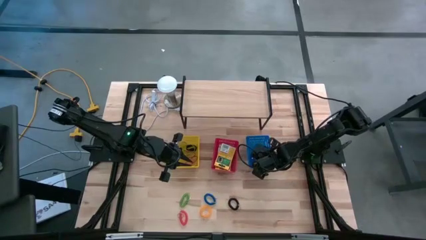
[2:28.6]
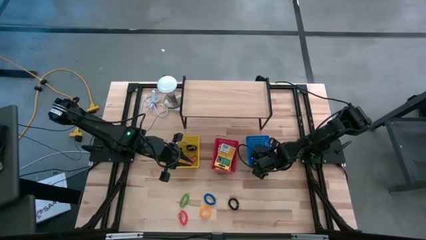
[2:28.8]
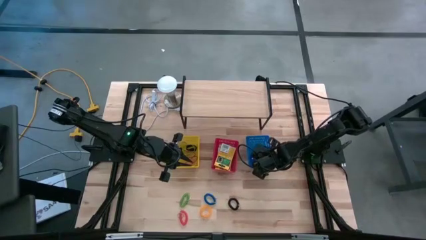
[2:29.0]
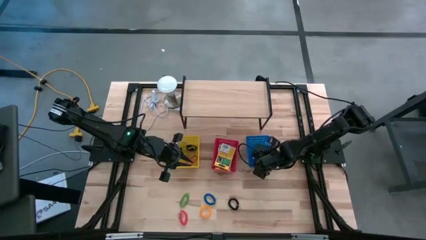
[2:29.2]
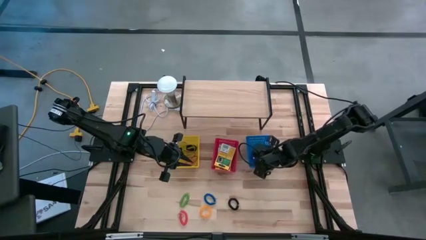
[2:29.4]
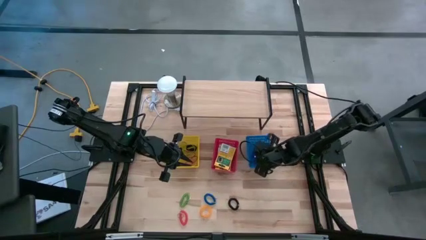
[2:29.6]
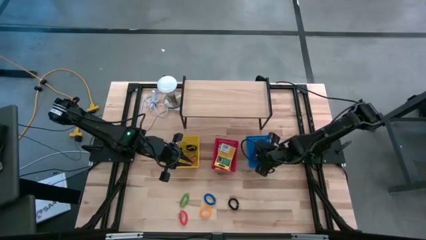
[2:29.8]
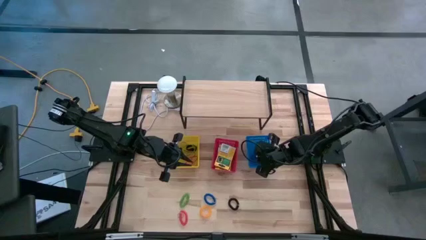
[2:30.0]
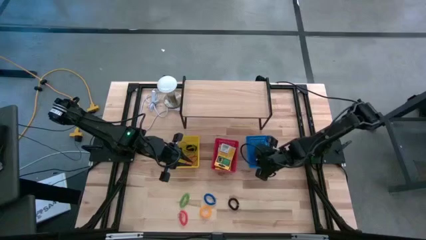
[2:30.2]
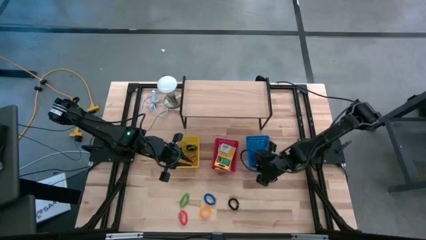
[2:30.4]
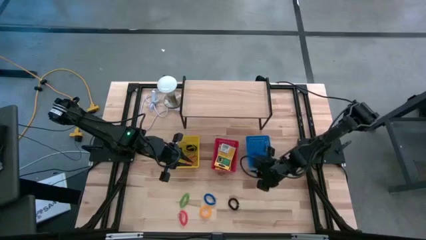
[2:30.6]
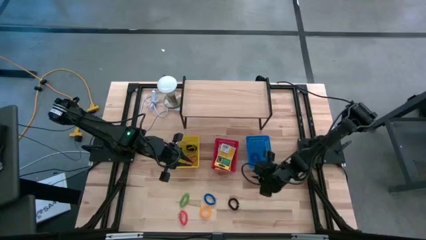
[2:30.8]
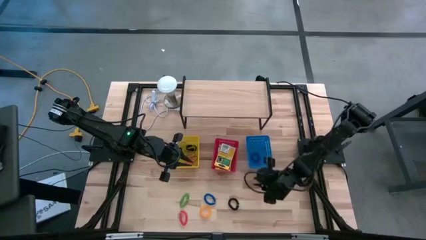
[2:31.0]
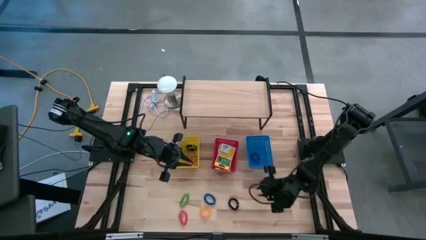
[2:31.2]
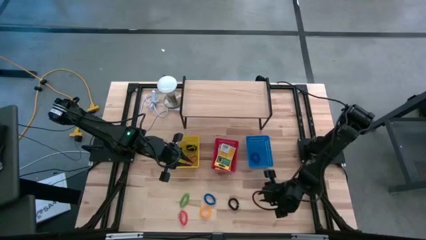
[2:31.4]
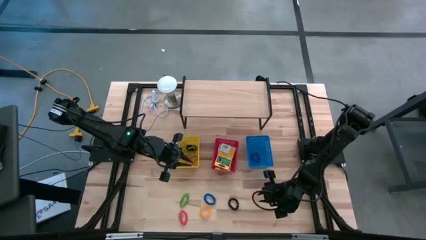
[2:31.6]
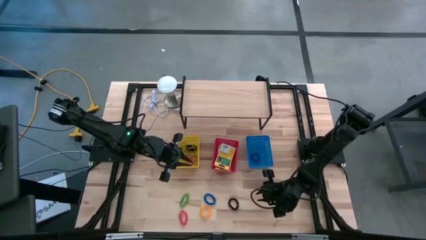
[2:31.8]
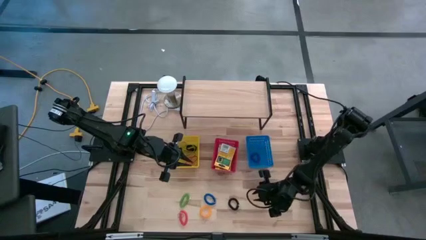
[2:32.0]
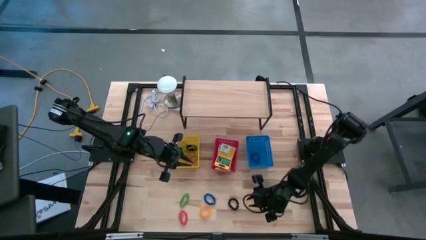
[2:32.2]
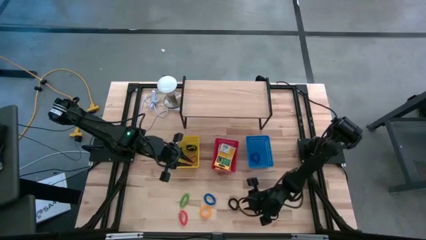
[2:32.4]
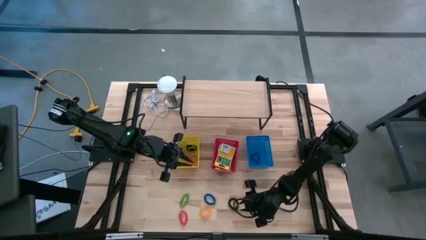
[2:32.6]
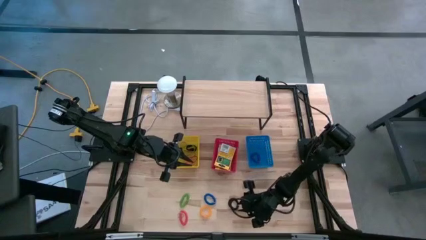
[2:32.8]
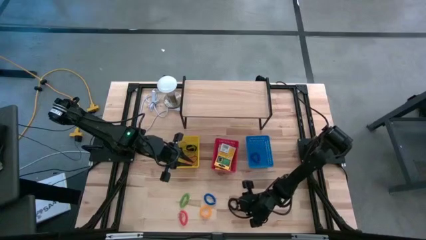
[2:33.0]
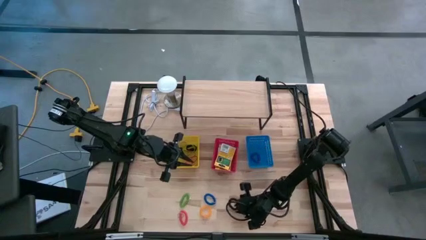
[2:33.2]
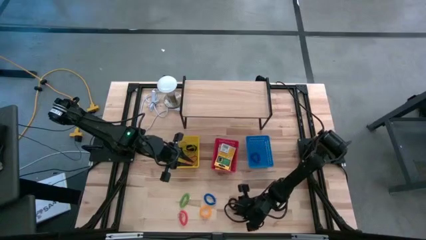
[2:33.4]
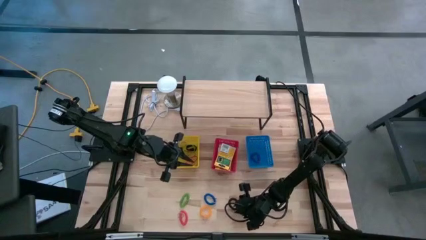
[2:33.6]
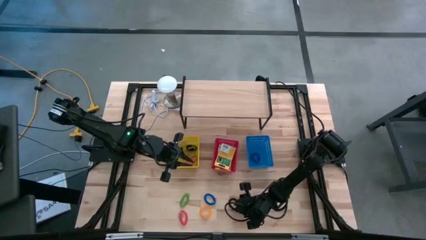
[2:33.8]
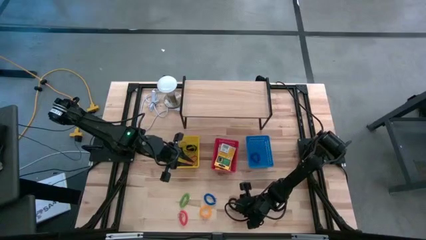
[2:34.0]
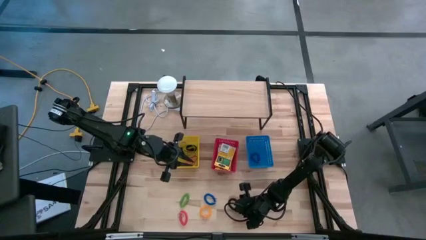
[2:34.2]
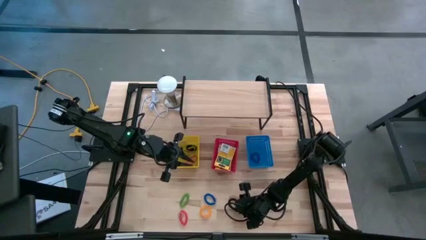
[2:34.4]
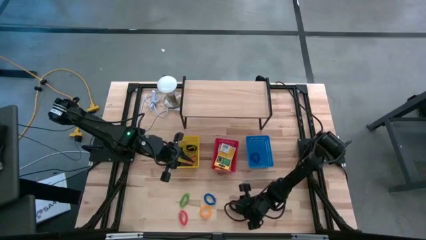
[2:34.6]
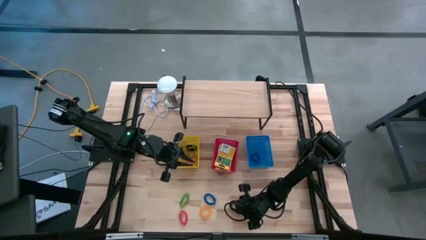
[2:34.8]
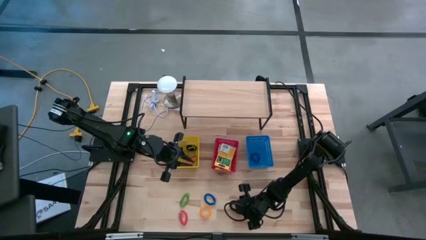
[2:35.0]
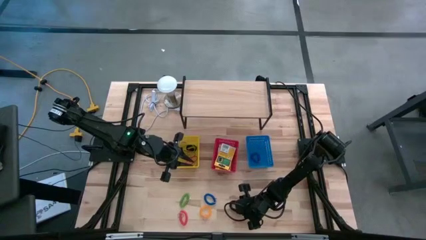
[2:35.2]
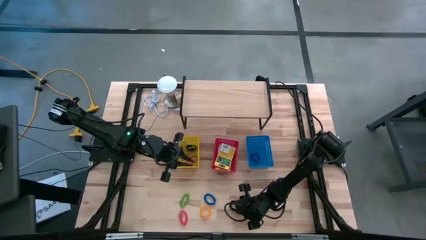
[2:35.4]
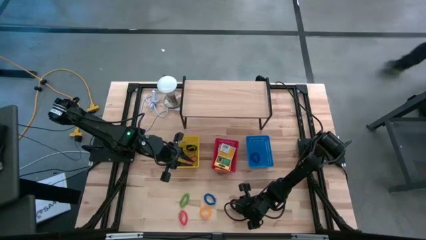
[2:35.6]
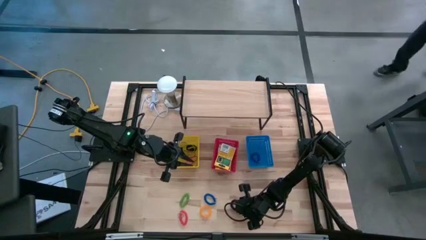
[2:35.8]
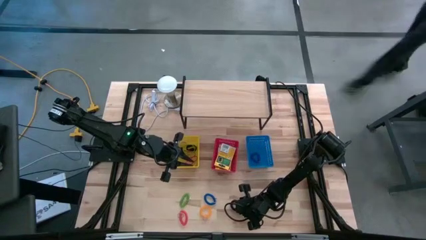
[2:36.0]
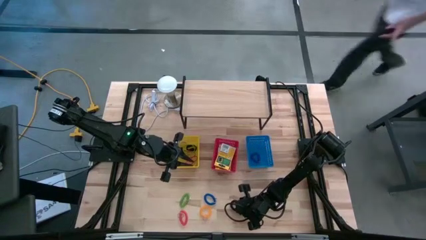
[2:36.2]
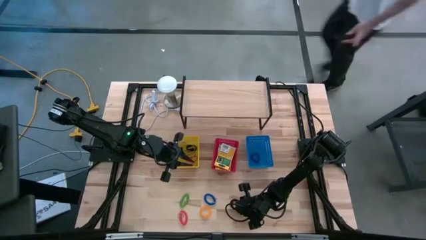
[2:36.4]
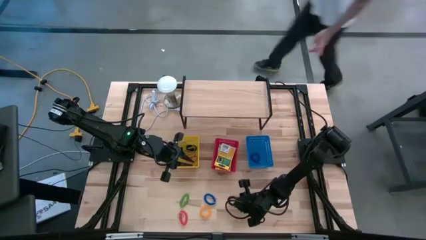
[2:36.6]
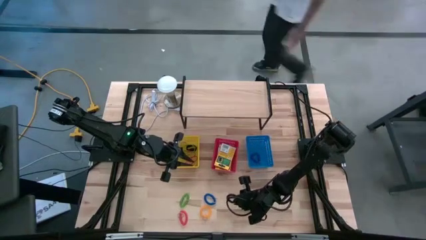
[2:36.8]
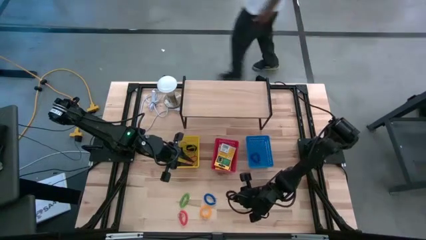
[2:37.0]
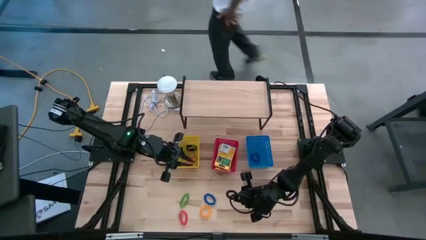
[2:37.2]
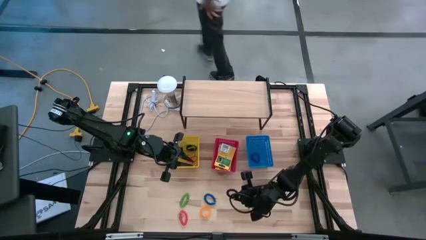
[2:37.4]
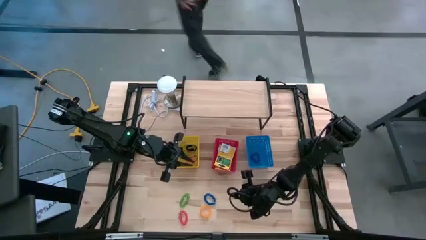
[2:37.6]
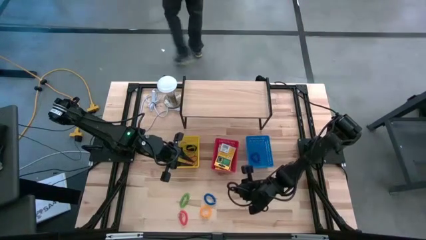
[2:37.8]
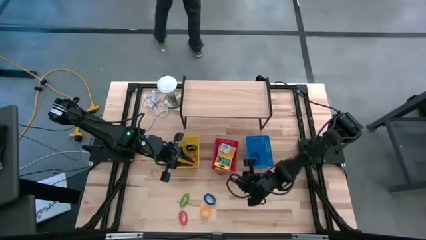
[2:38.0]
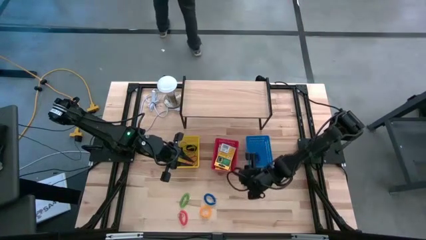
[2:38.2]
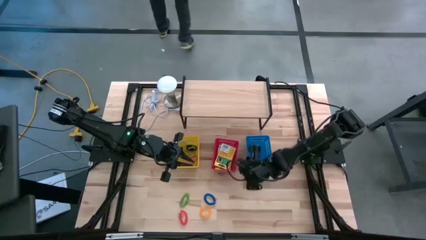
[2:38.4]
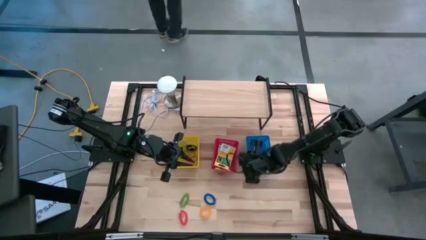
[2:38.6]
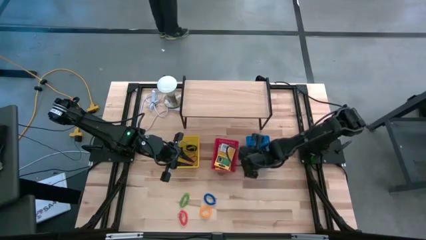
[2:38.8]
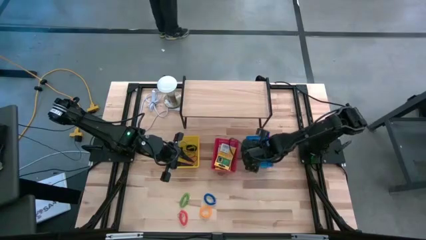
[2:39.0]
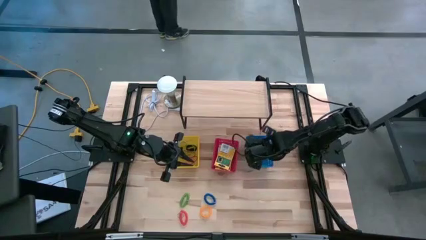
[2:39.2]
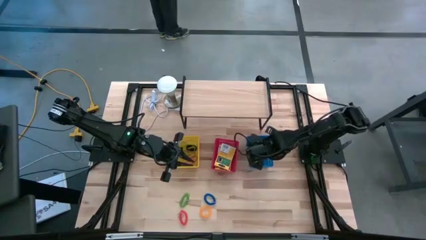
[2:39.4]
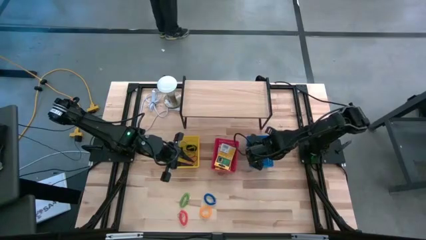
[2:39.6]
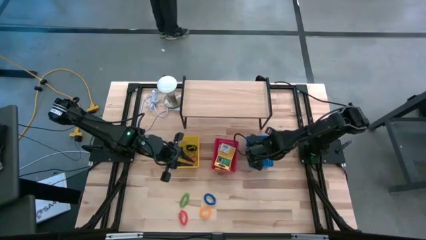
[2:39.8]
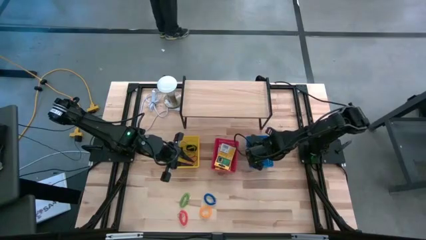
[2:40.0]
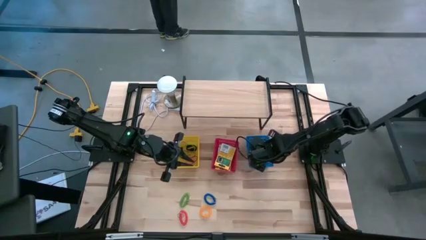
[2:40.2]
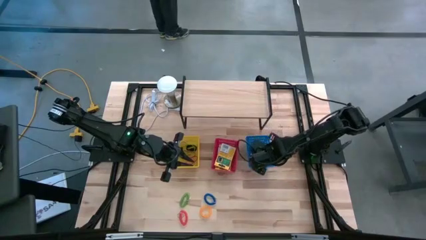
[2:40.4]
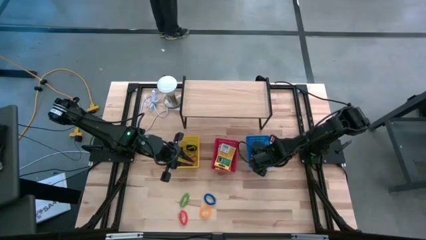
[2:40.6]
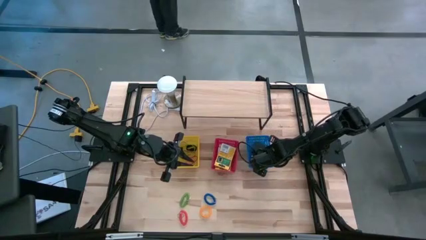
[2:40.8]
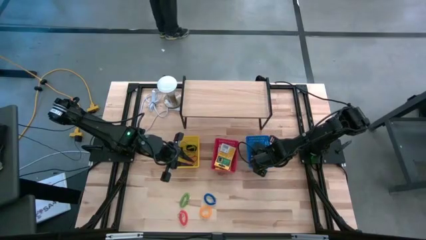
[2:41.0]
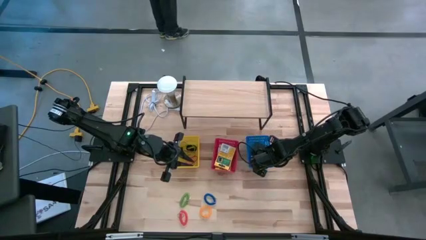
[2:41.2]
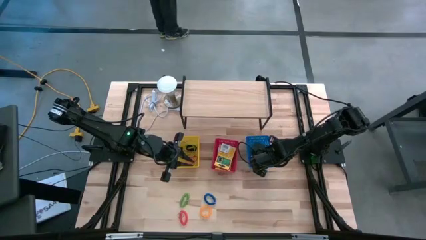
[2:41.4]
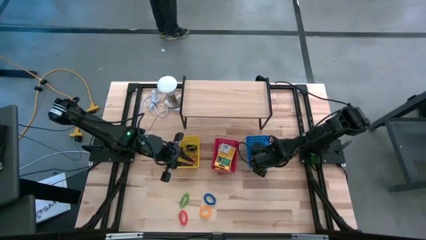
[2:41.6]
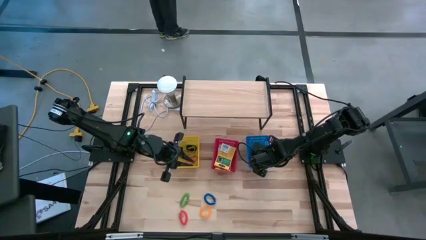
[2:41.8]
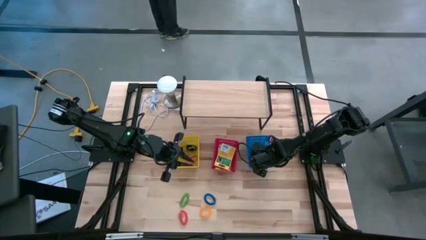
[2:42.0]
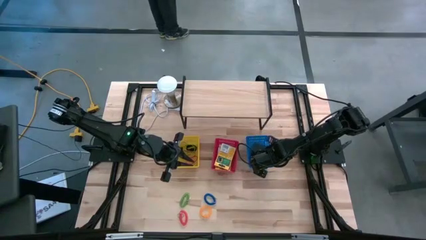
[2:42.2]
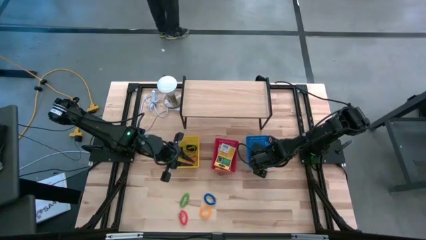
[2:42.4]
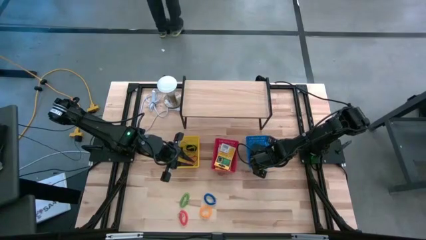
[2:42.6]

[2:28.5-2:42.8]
Task: Pick & Place Office Desk Supplies
Put the black spiral keychain into the blue bin
